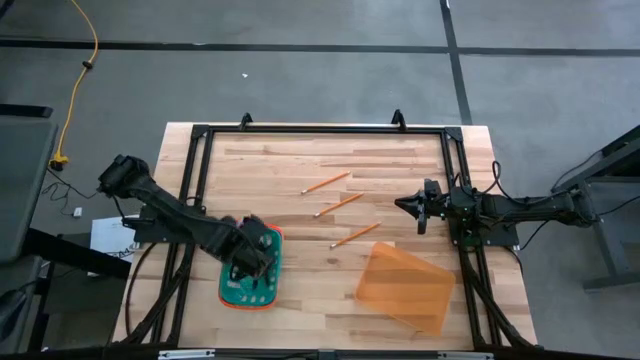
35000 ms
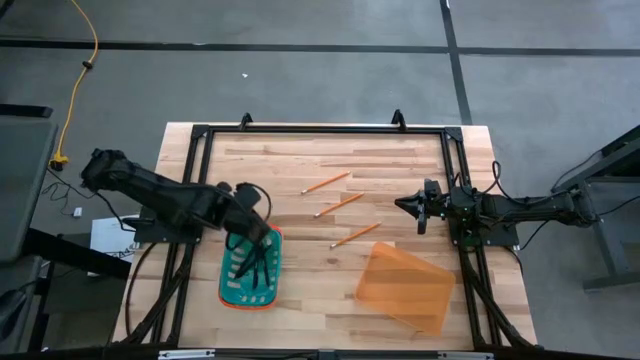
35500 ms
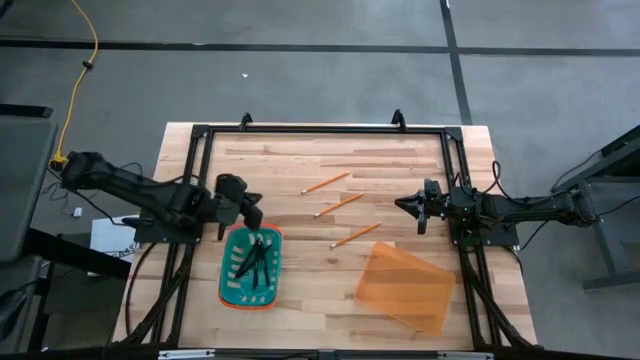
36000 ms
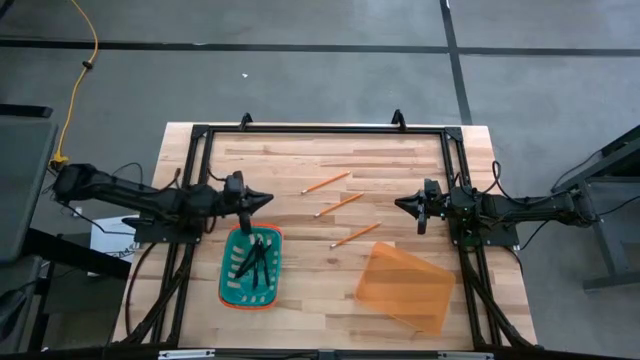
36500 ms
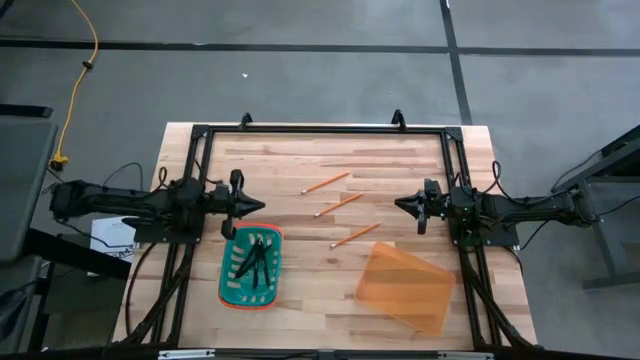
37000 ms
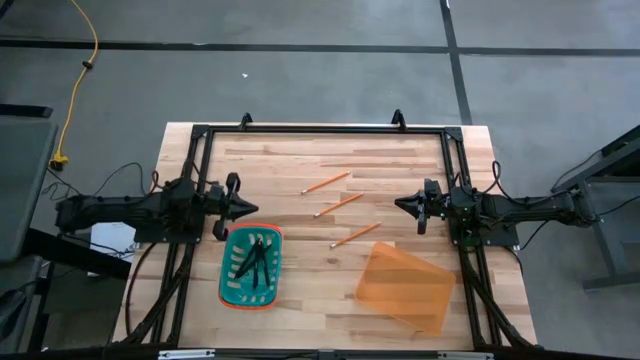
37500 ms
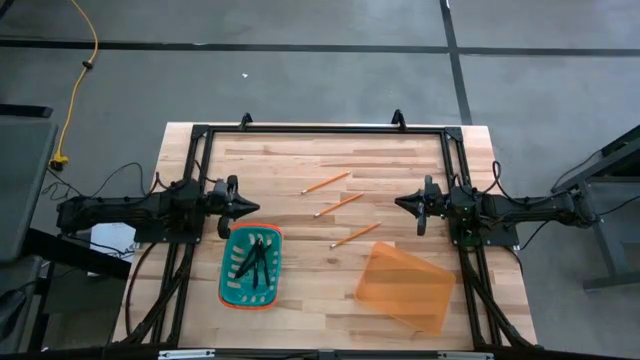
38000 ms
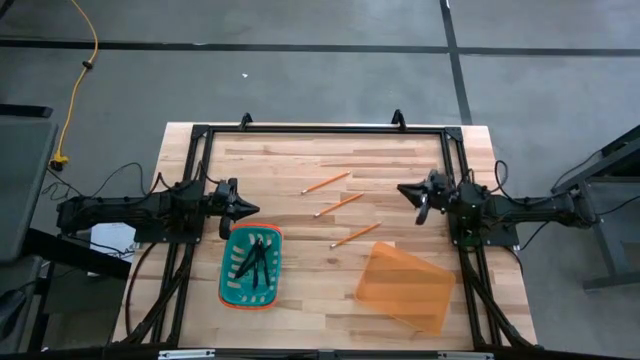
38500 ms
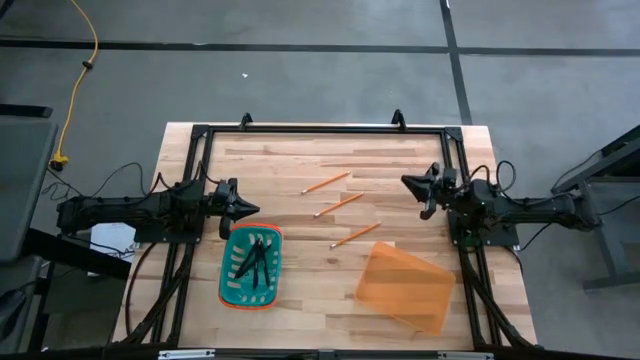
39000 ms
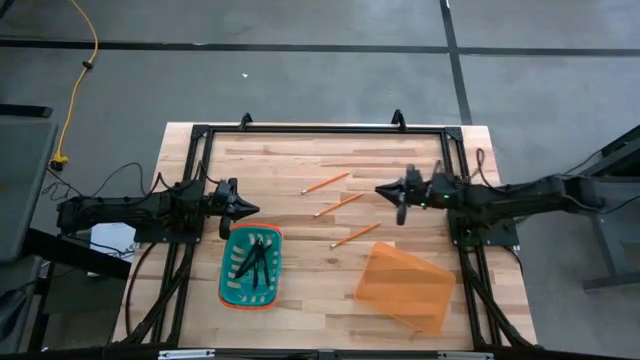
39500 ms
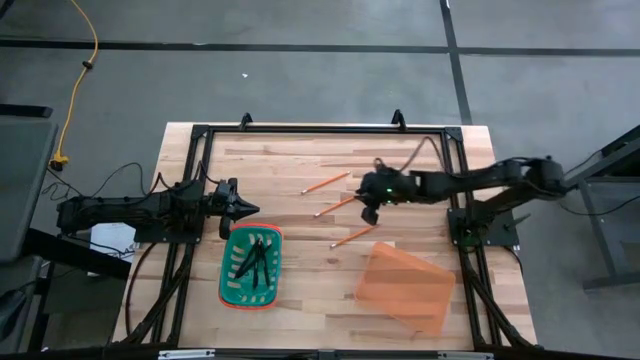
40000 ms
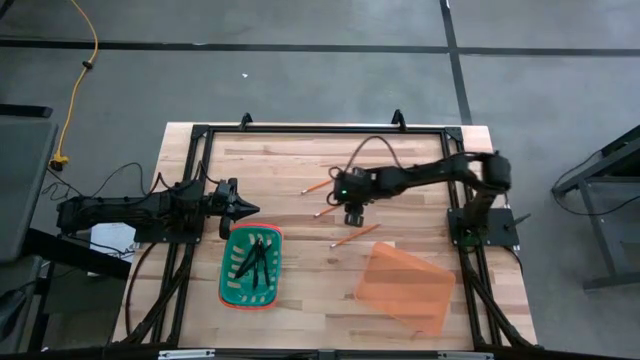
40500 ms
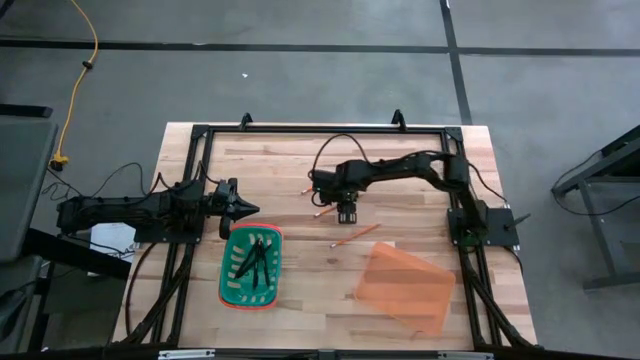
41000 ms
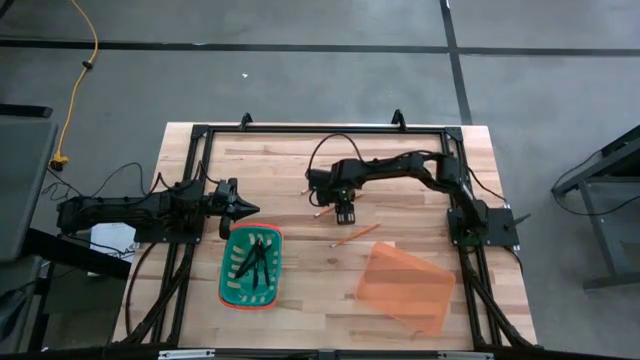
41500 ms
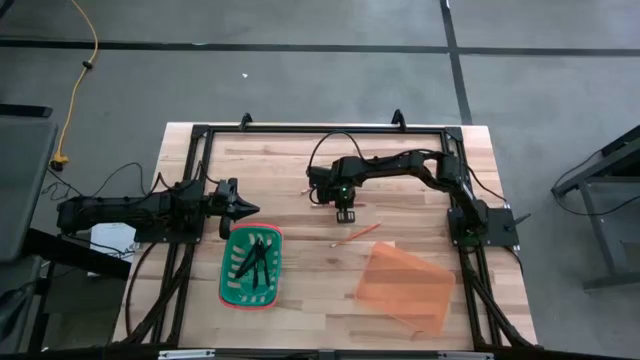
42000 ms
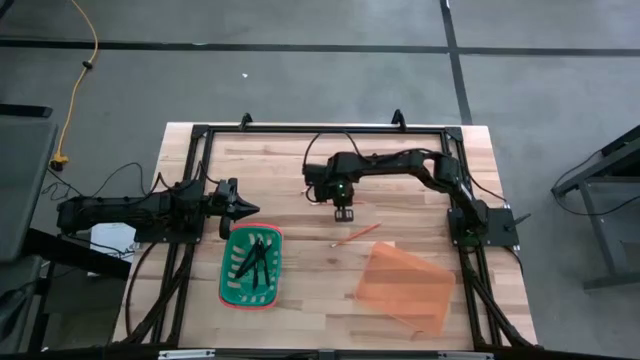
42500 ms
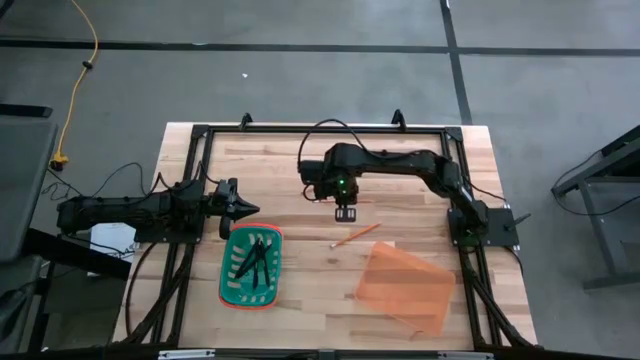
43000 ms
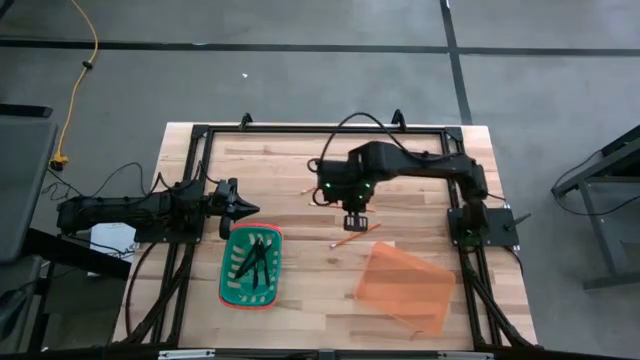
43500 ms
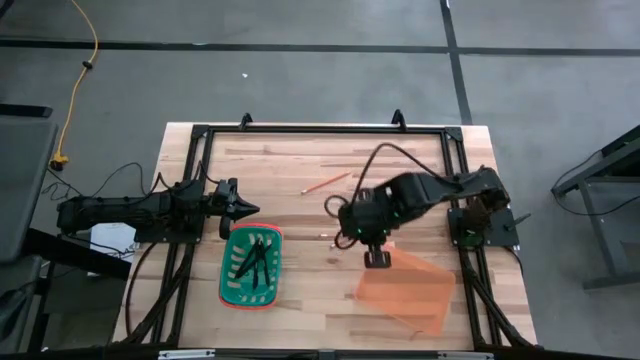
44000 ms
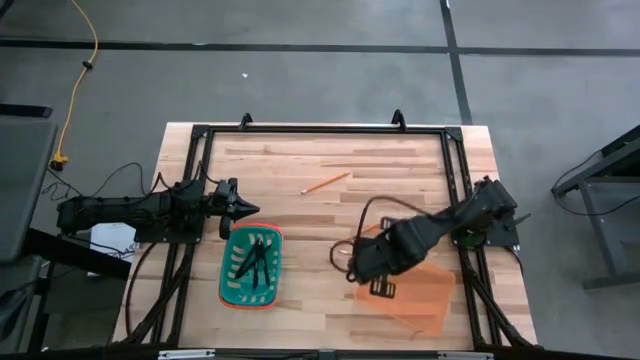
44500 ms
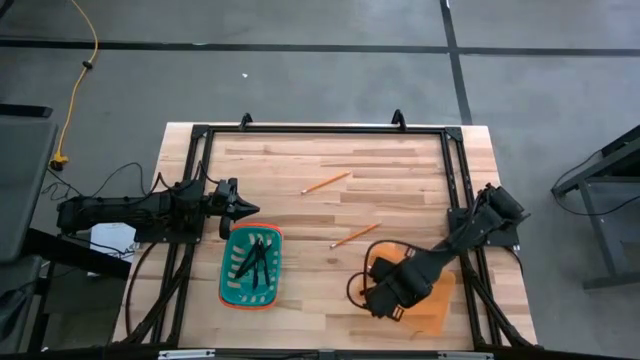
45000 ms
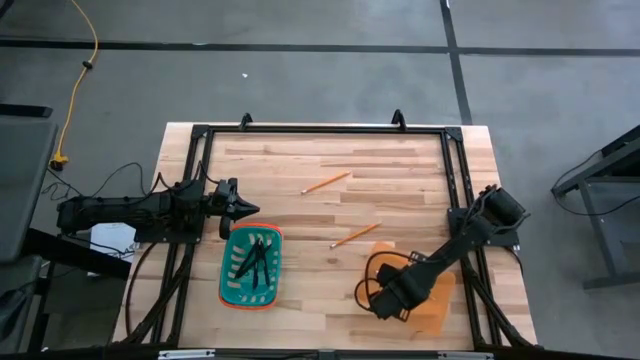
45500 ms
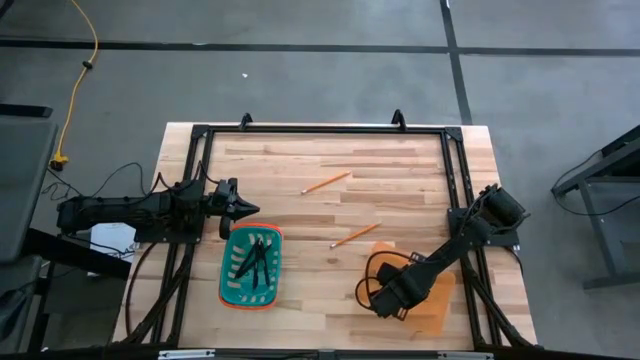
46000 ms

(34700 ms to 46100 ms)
Task: Sort pens & pencils
Put the yellow pencil into the orange bin

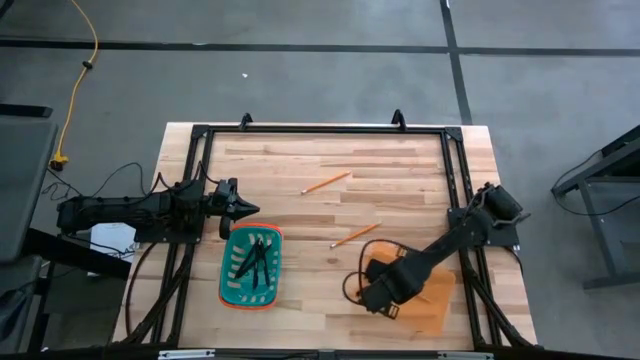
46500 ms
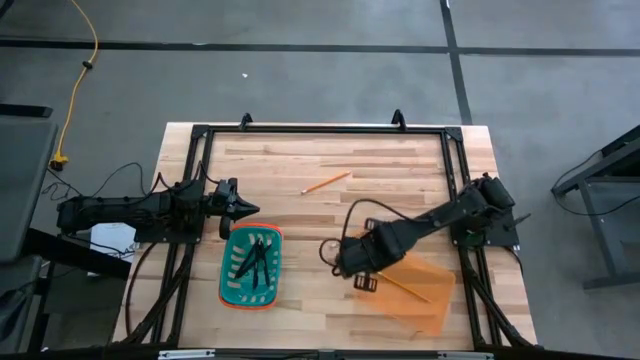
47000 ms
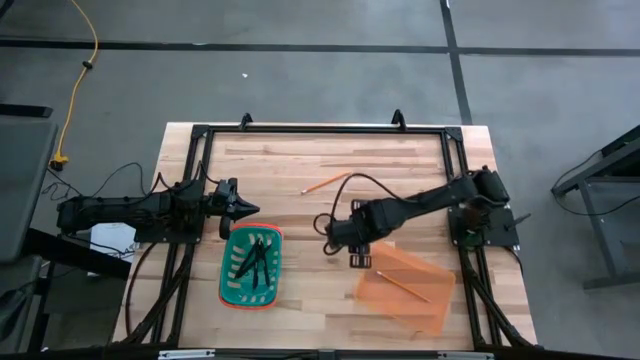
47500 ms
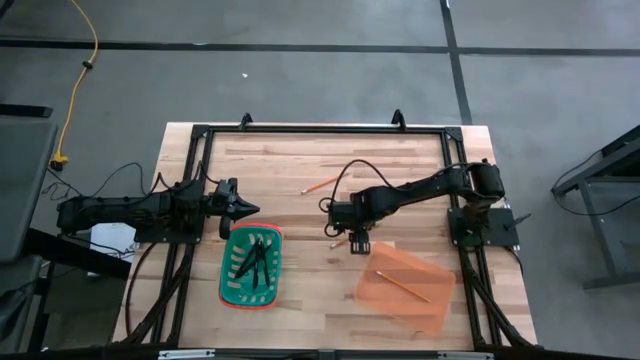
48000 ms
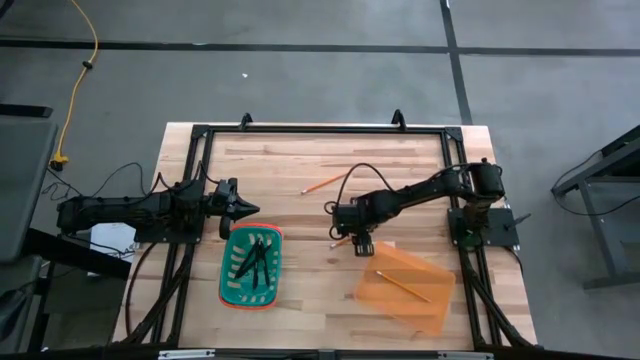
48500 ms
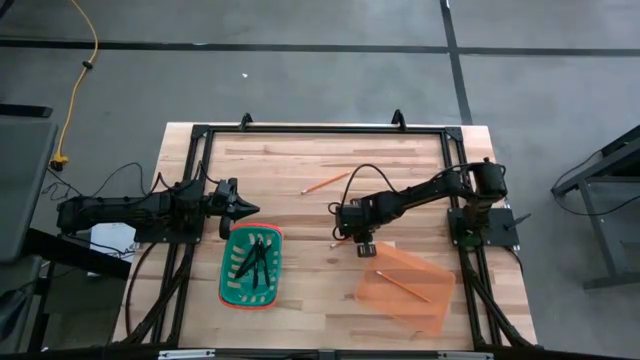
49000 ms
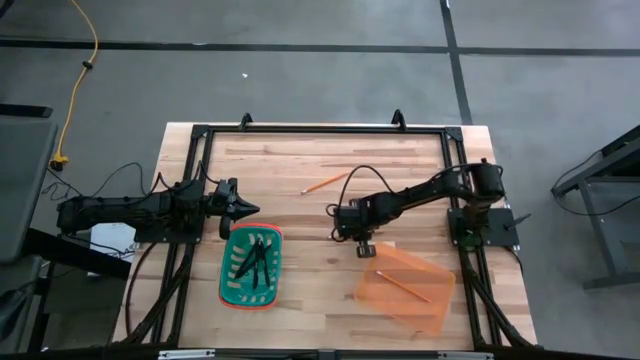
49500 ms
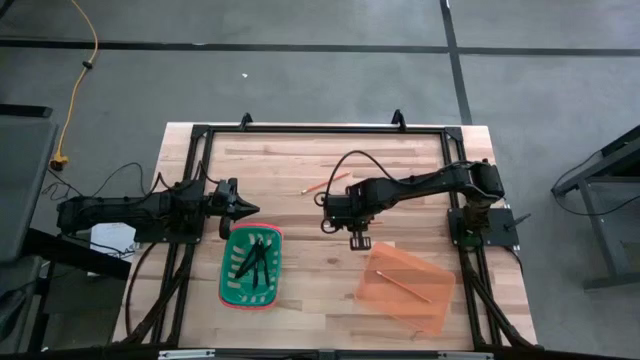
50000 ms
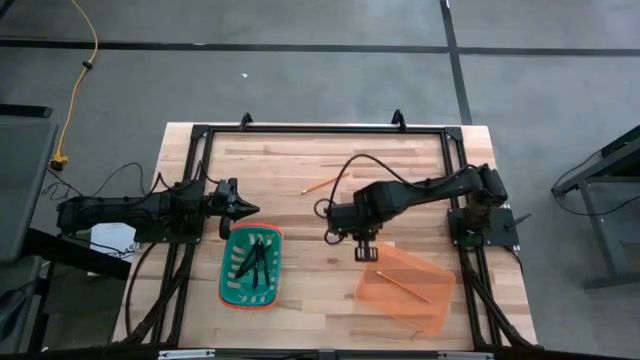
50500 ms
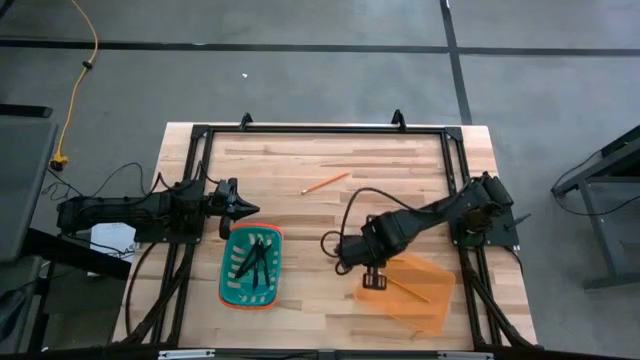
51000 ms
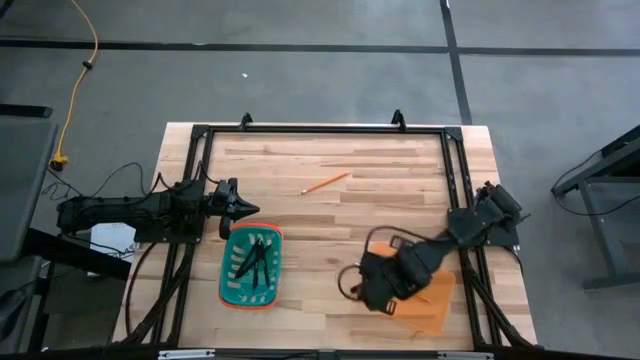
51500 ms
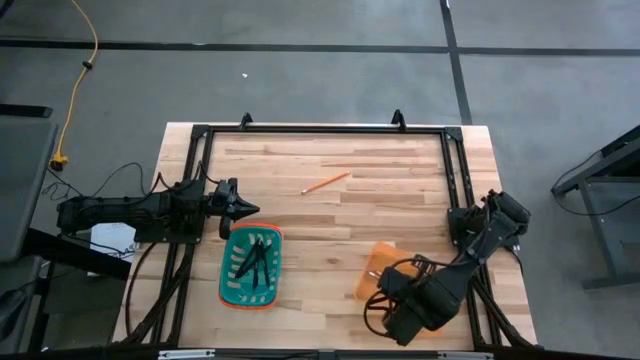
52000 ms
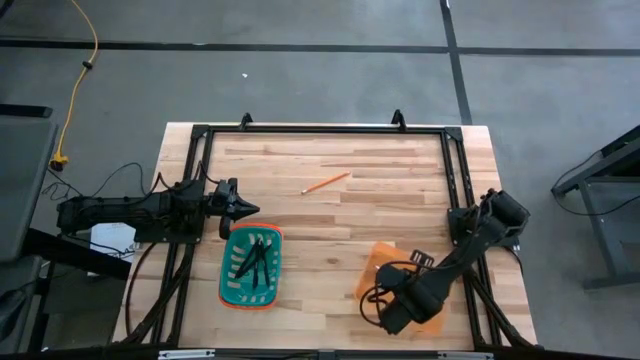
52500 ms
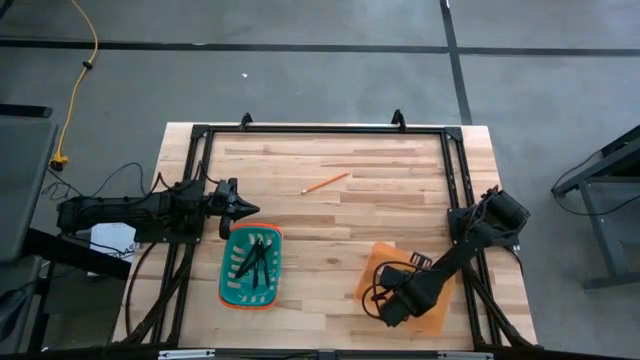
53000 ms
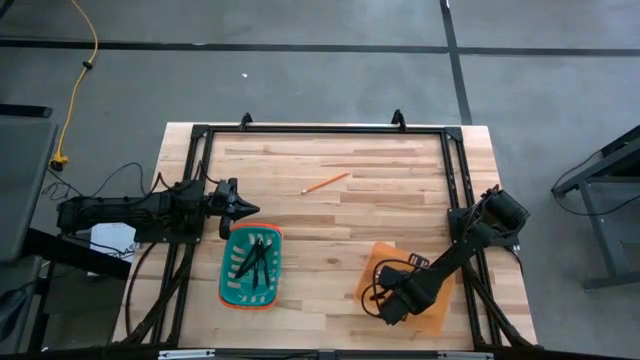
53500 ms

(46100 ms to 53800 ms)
Put the yellow pencil into the orange bin

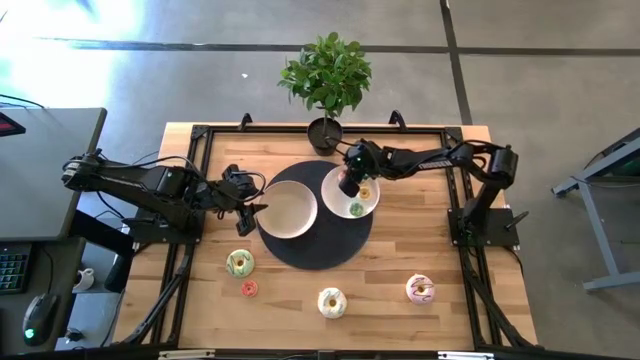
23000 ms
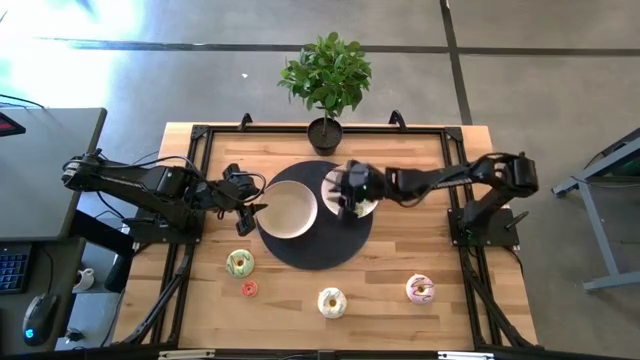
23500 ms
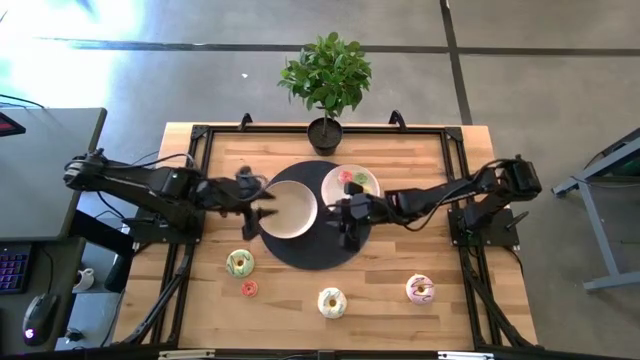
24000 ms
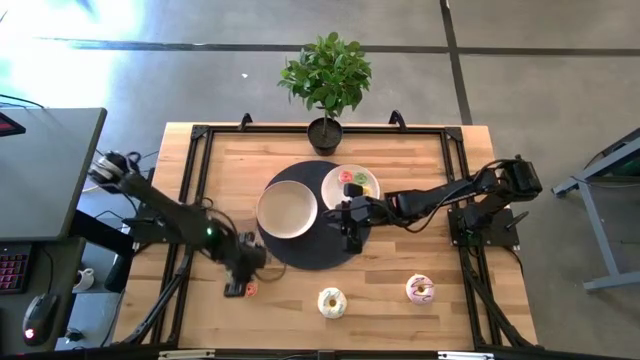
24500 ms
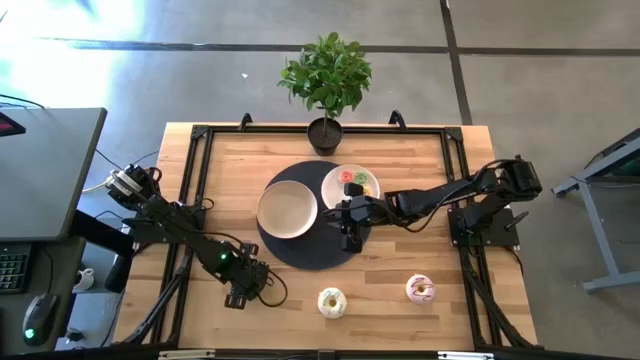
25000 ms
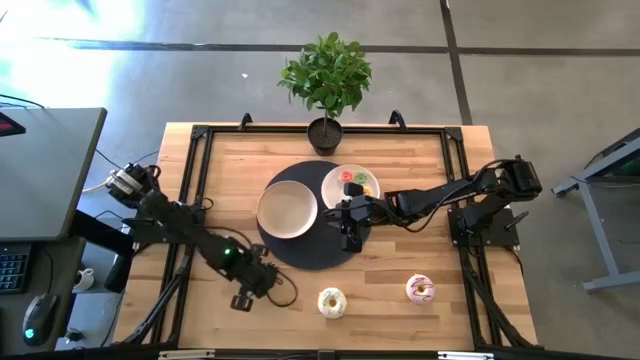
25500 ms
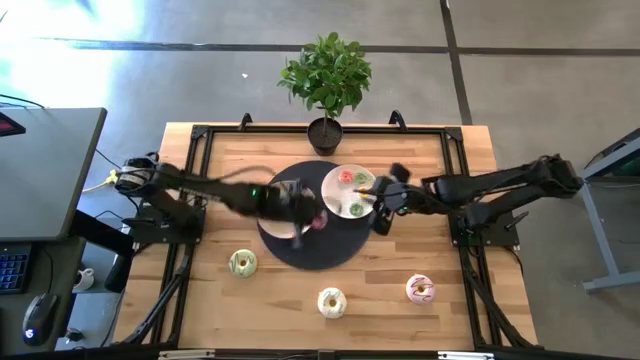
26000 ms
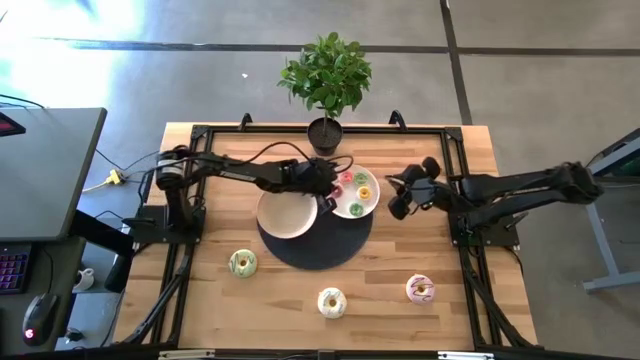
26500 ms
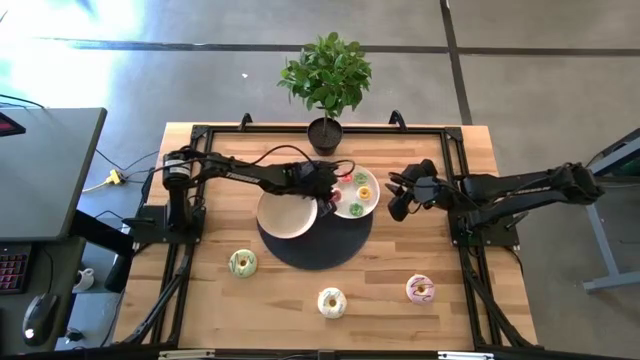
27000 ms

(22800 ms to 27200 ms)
Task: Pick & Place donuts
Put the small pink donut on the right white plate
